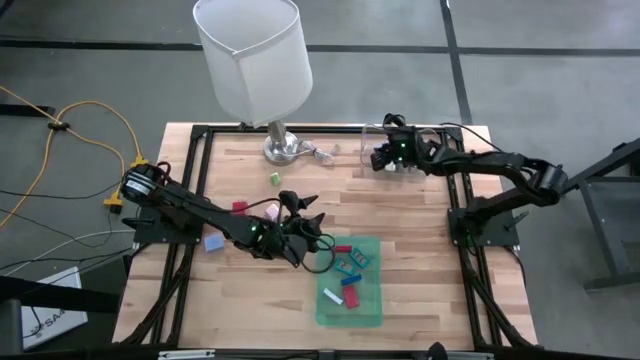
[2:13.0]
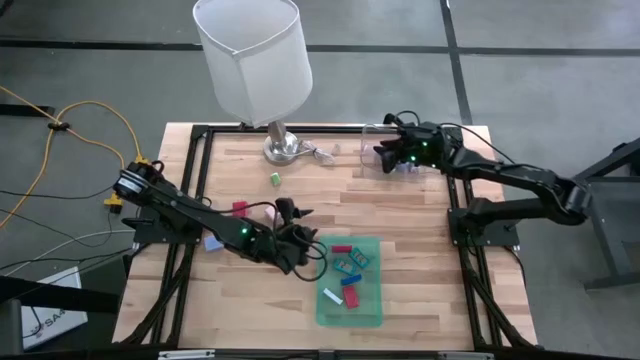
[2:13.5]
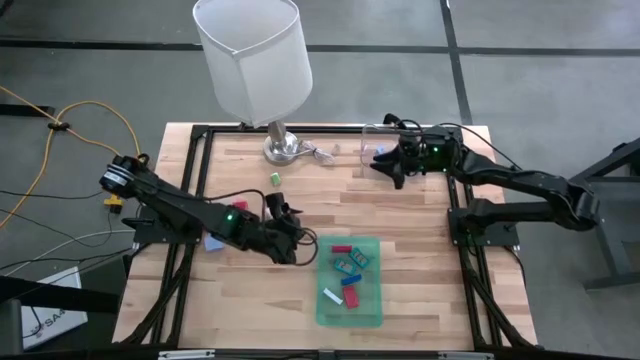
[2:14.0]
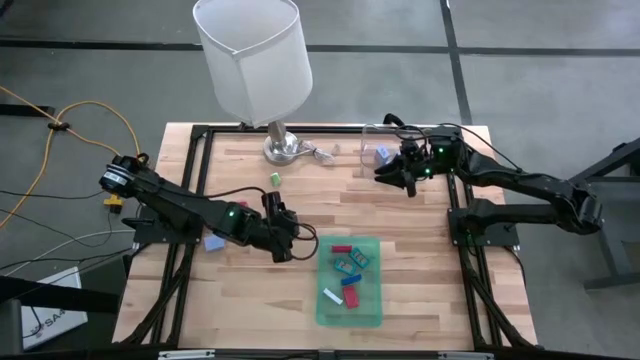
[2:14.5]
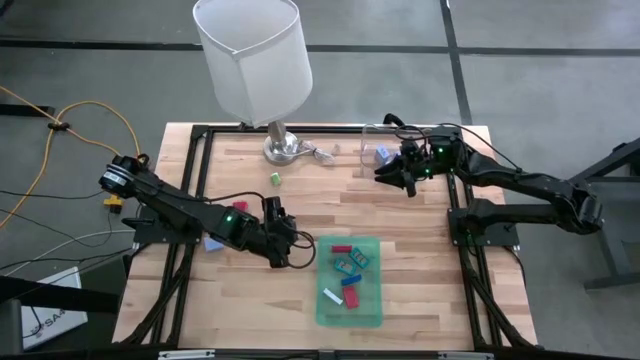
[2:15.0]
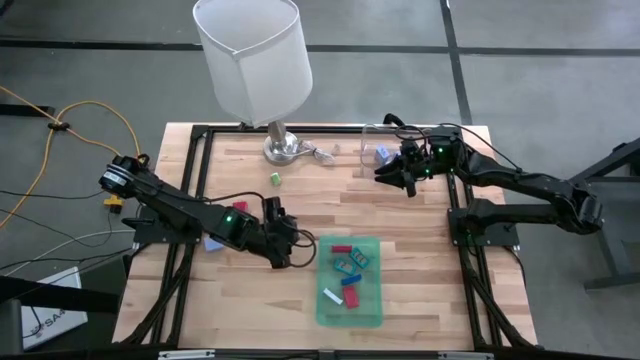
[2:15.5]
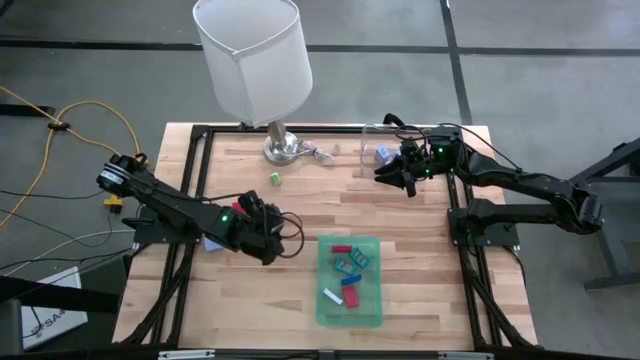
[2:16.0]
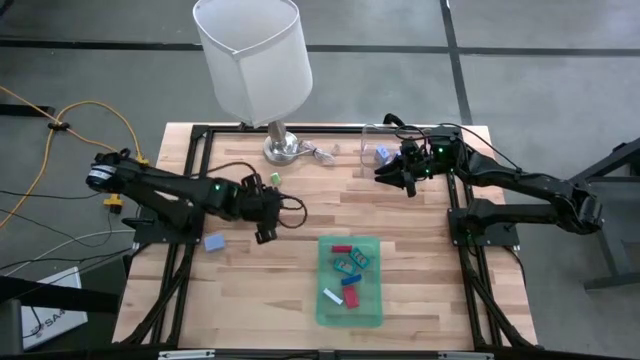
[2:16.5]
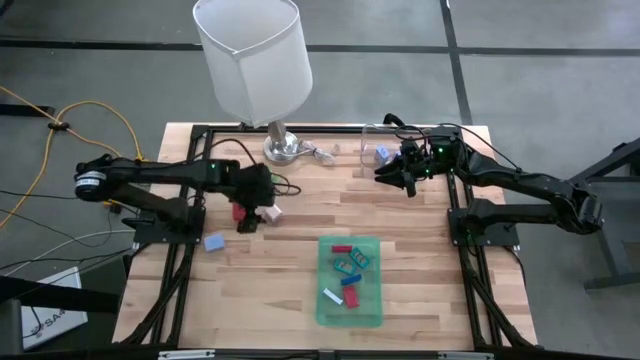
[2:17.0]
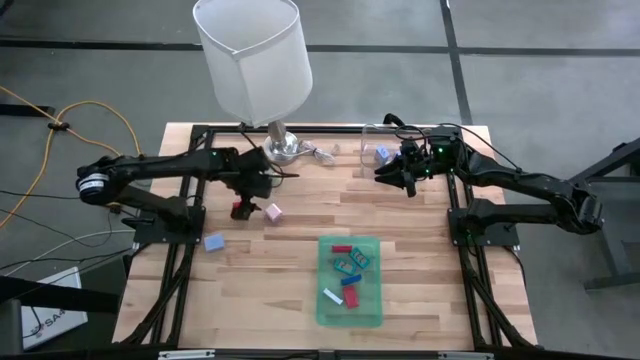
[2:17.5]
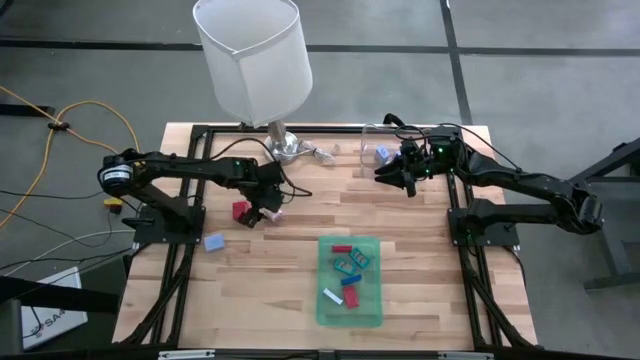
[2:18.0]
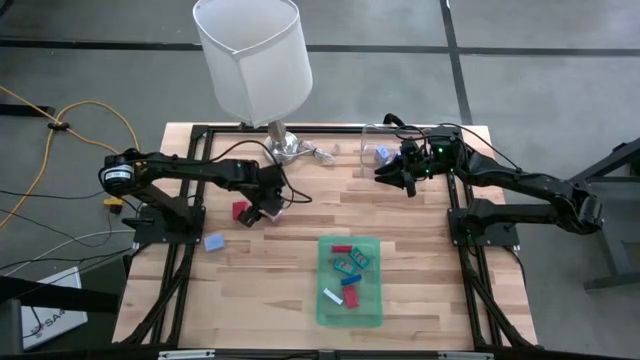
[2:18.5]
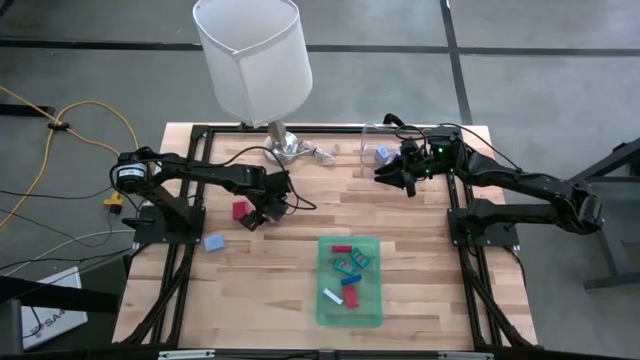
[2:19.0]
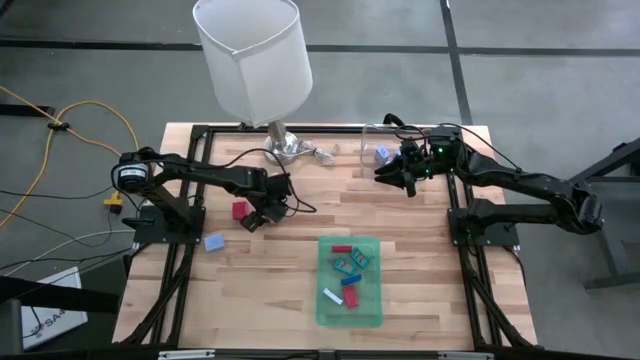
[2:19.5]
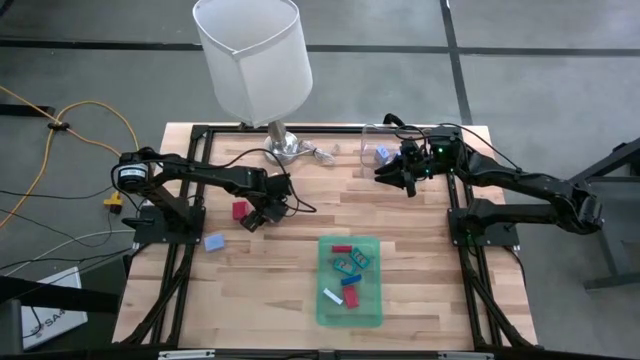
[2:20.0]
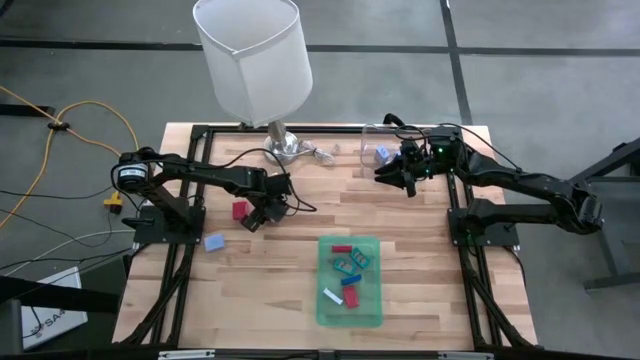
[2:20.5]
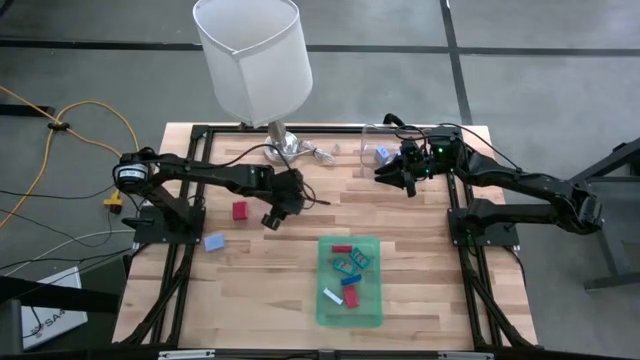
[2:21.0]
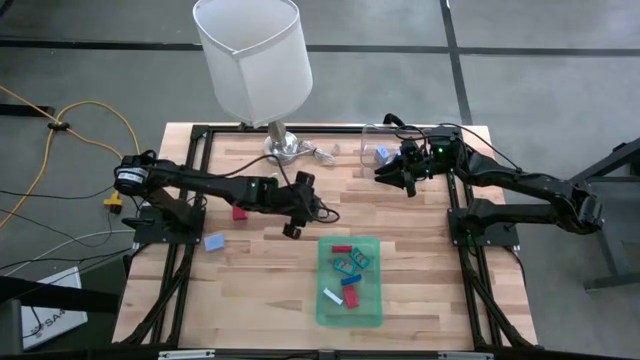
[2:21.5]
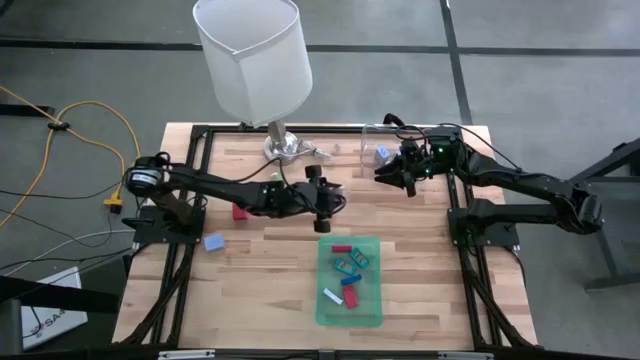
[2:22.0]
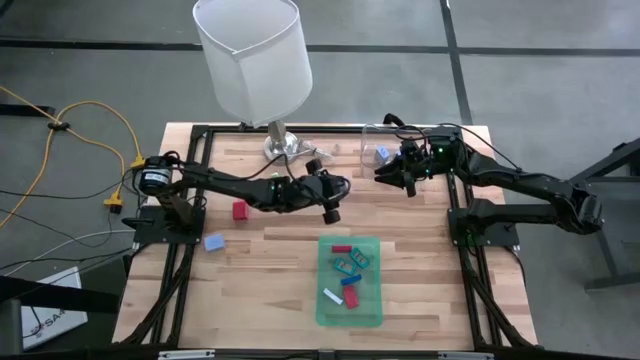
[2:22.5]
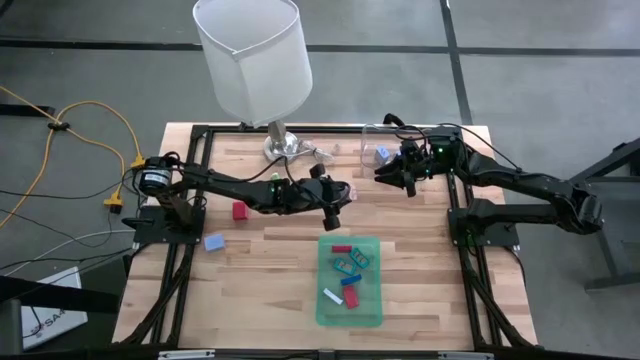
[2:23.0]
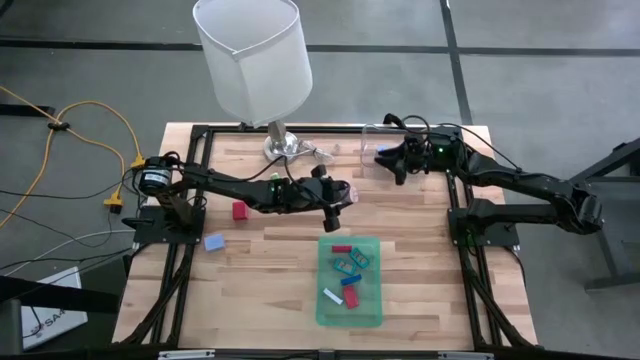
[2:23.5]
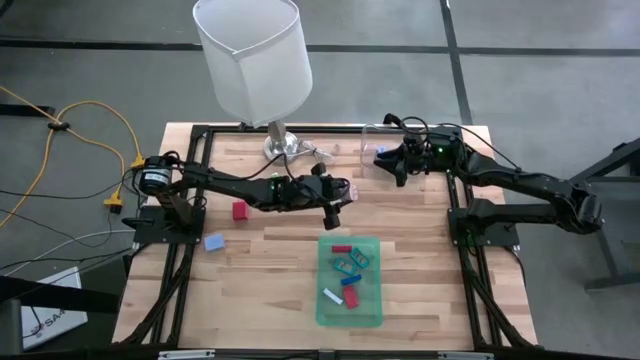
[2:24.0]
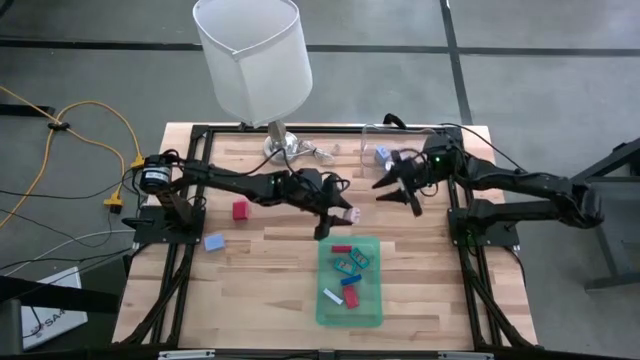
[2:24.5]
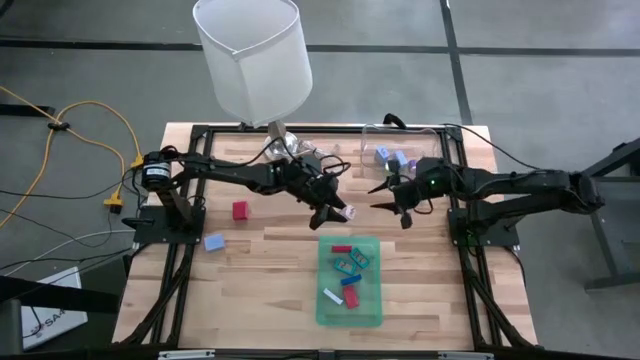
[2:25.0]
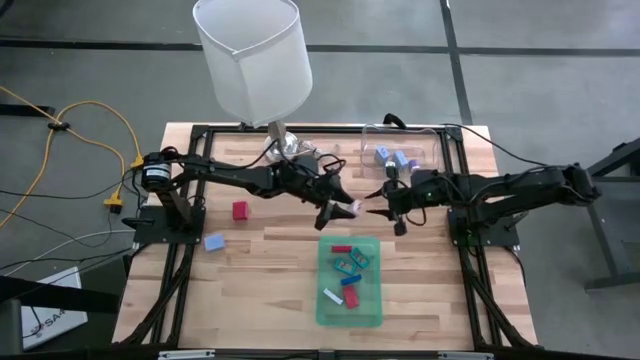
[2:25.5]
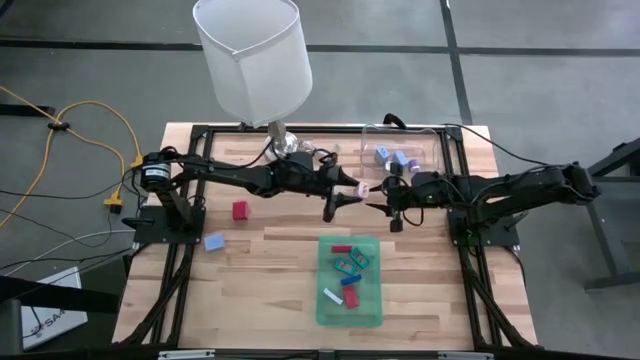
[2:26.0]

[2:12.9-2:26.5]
Task: Pick & Place Office items
Put the pink charger adapter into the transparent bin

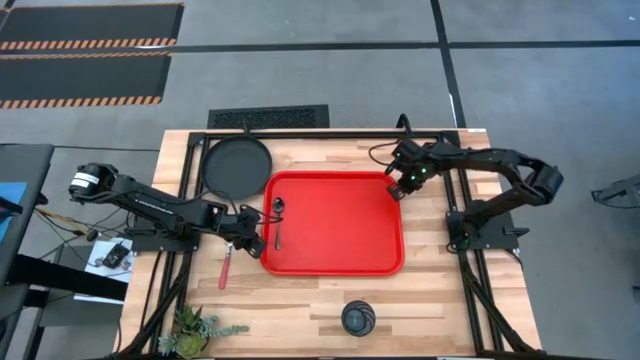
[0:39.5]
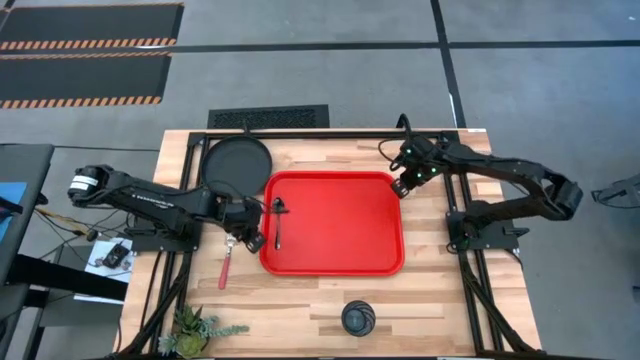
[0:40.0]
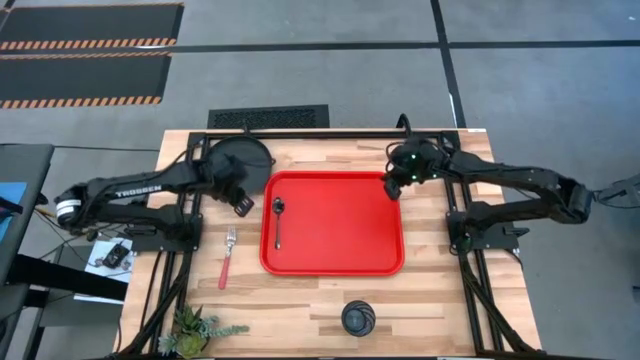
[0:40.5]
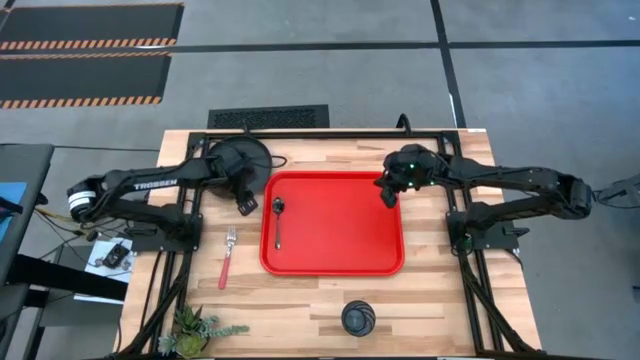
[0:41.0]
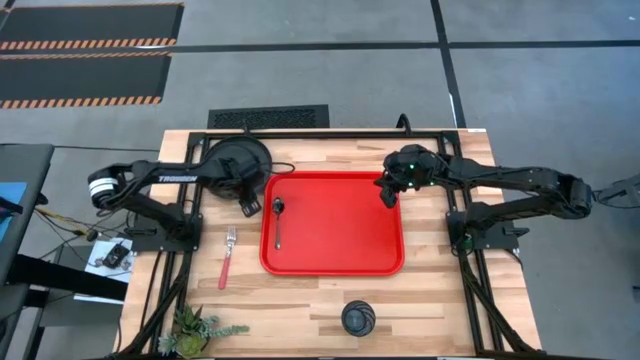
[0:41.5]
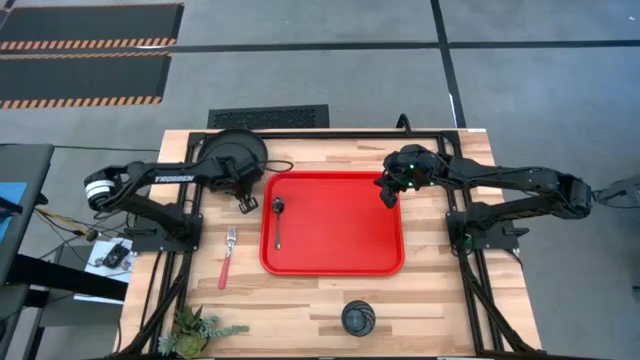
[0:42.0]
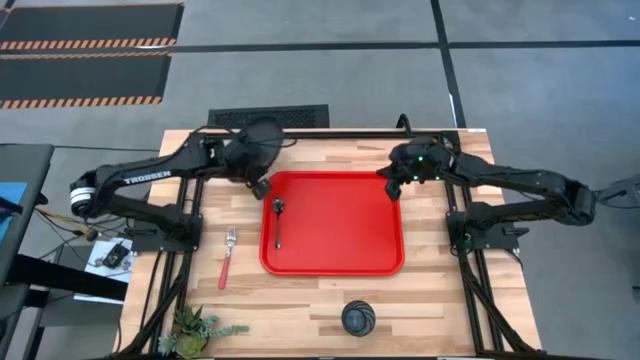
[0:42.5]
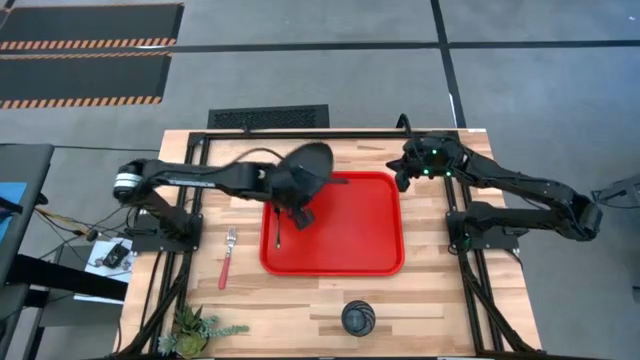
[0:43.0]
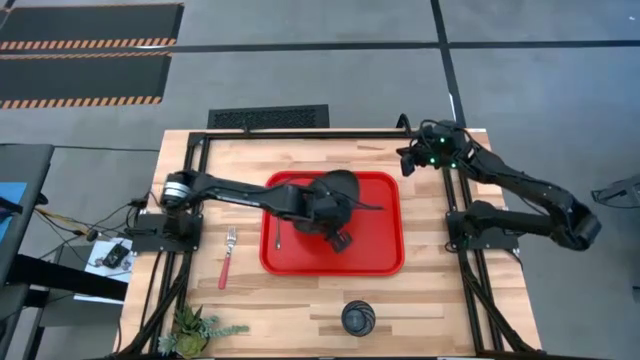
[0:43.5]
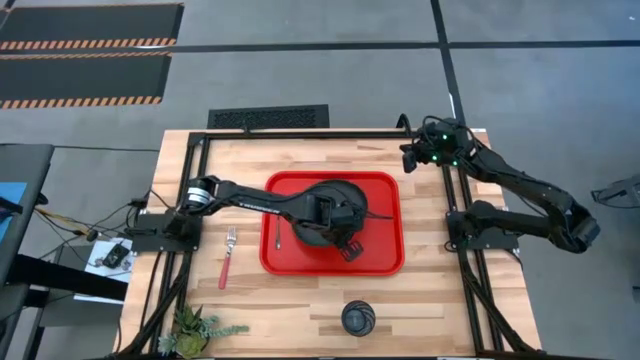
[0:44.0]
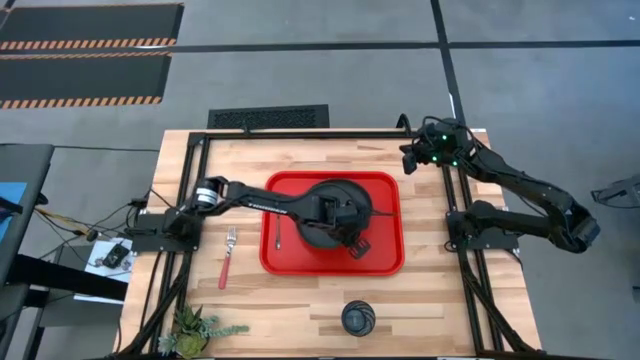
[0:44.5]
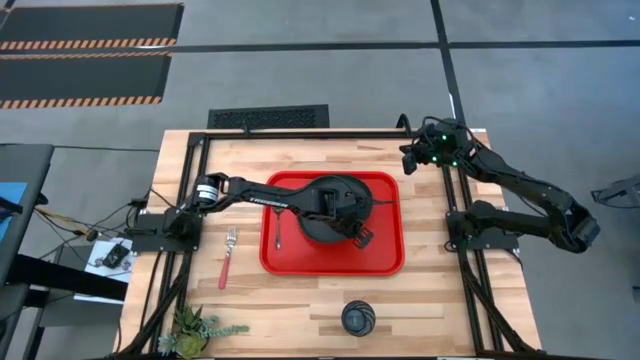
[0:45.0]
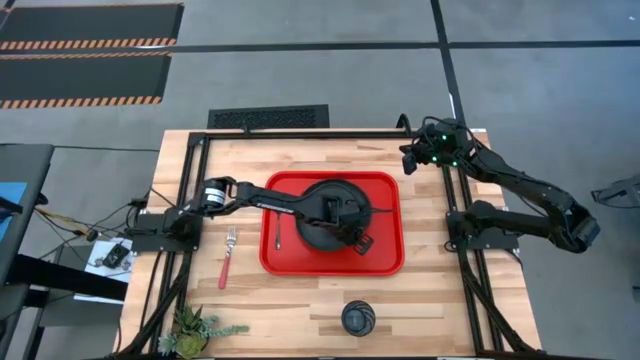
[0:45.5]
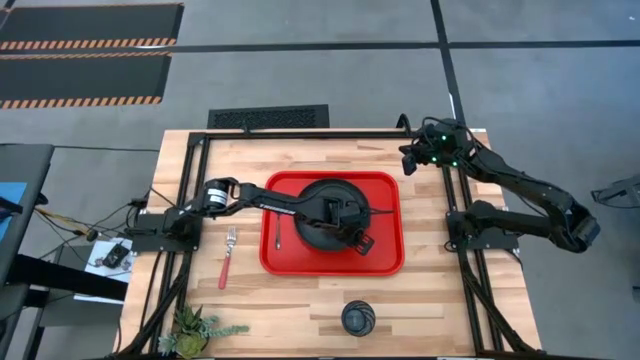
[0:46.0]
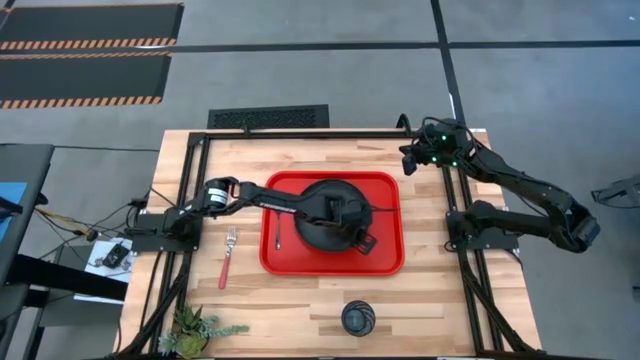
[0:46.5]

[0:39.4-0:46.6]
Task: Pick and place plate/cup/fork/spoon on tray
Put the black plate on the orange tray
